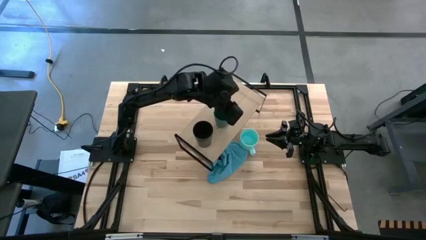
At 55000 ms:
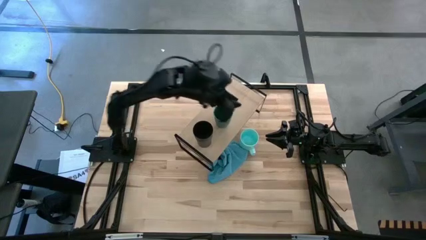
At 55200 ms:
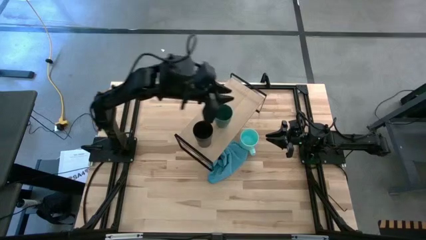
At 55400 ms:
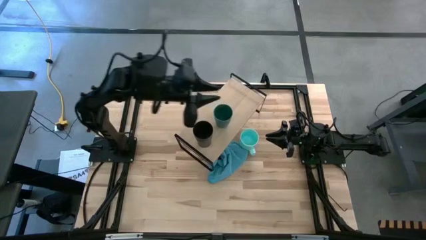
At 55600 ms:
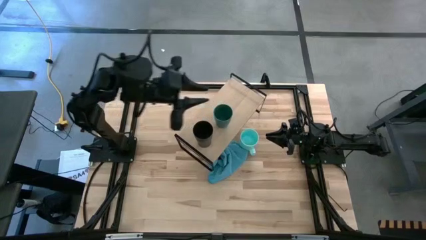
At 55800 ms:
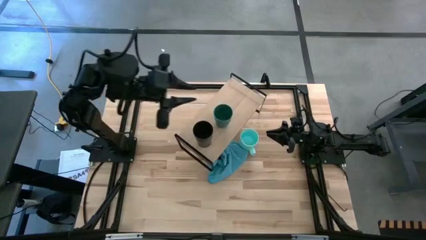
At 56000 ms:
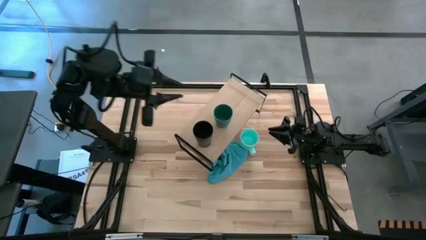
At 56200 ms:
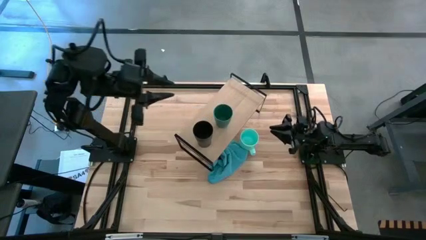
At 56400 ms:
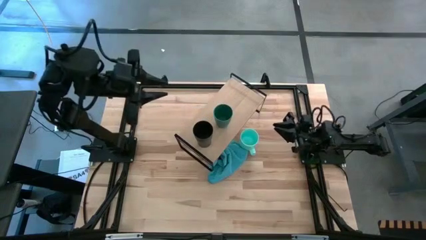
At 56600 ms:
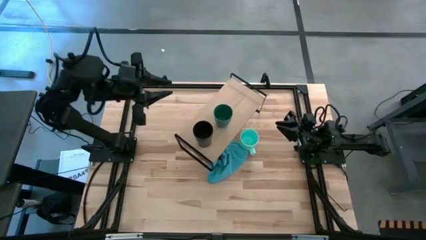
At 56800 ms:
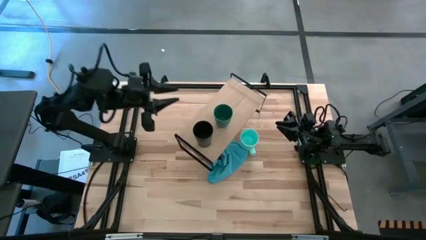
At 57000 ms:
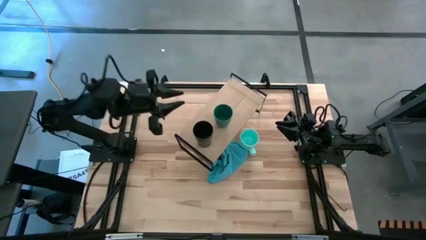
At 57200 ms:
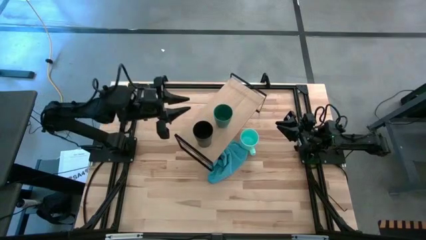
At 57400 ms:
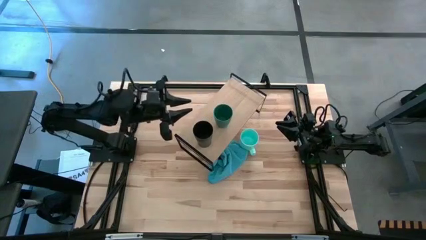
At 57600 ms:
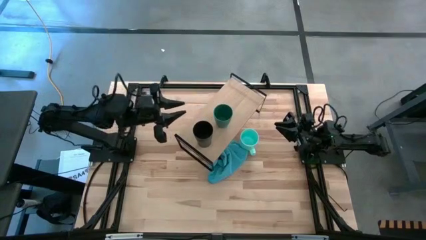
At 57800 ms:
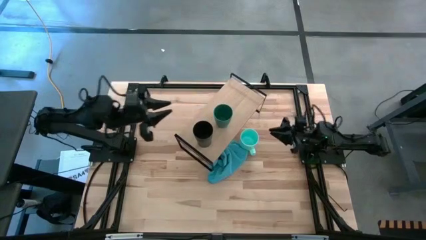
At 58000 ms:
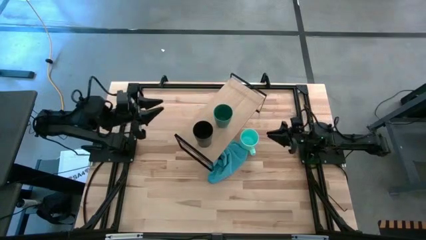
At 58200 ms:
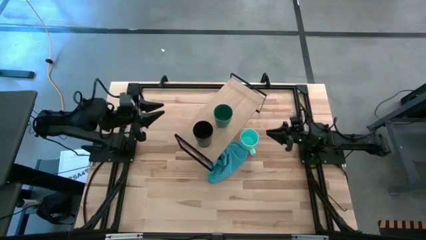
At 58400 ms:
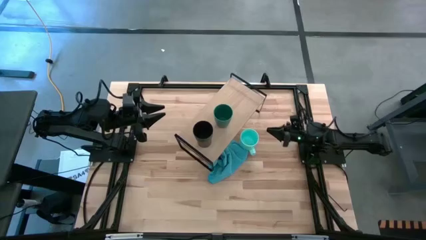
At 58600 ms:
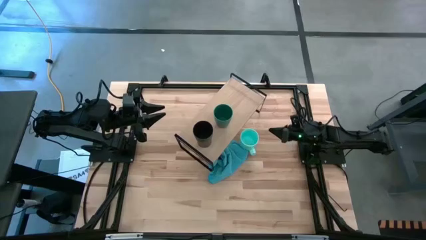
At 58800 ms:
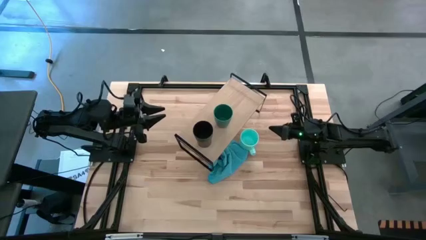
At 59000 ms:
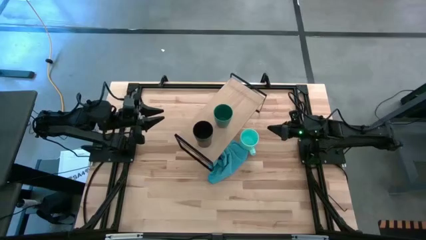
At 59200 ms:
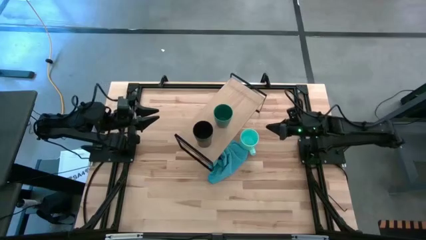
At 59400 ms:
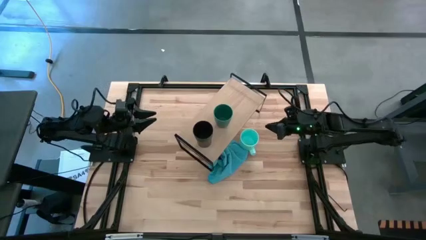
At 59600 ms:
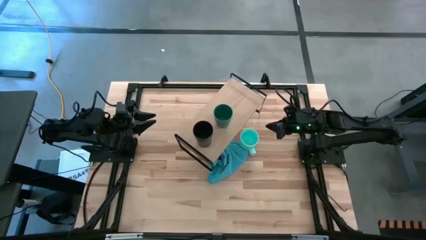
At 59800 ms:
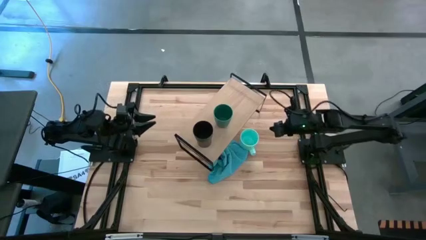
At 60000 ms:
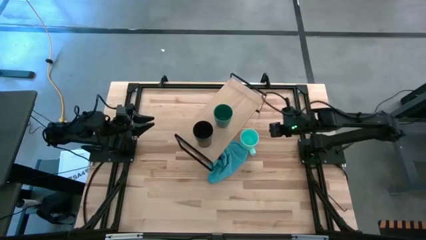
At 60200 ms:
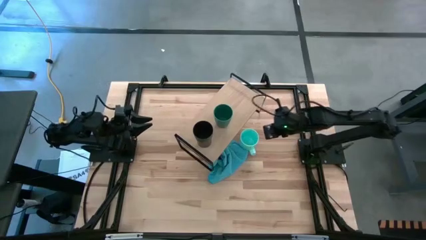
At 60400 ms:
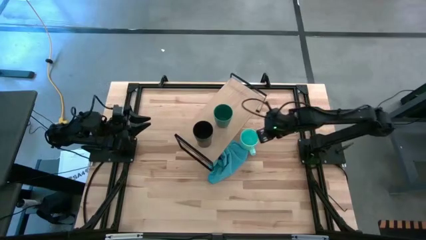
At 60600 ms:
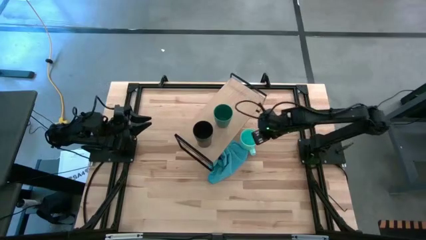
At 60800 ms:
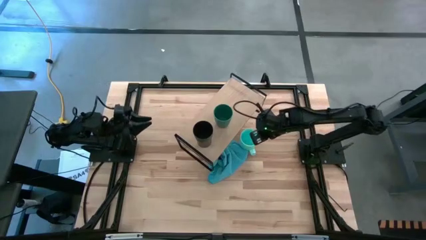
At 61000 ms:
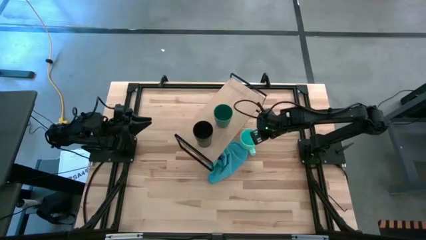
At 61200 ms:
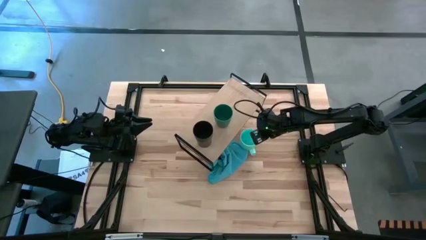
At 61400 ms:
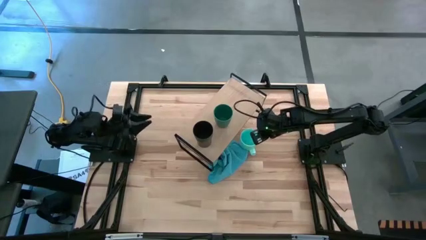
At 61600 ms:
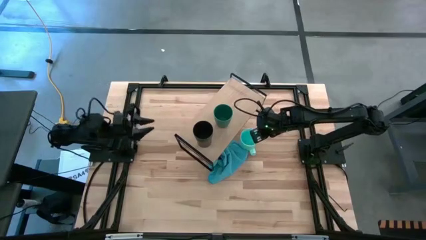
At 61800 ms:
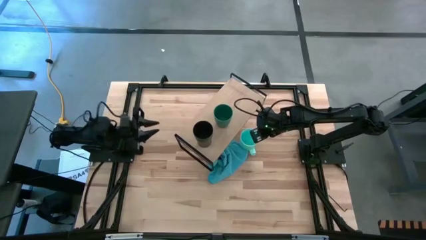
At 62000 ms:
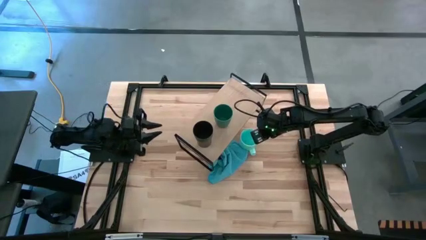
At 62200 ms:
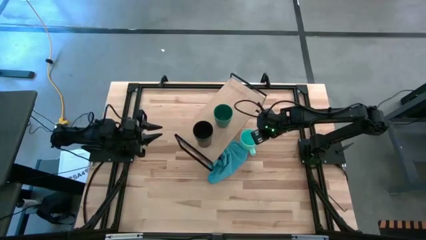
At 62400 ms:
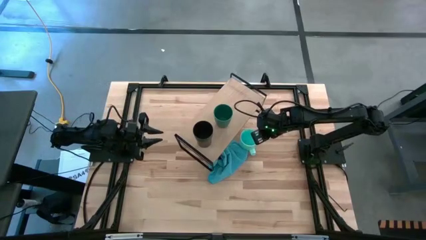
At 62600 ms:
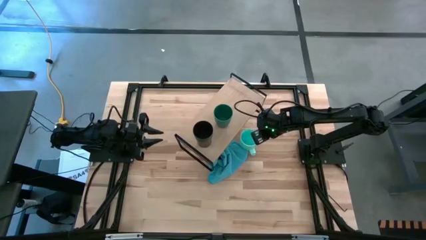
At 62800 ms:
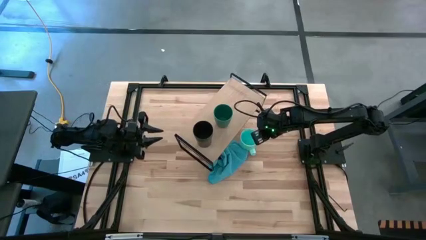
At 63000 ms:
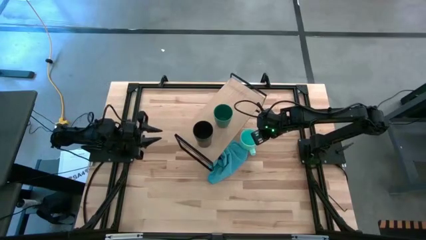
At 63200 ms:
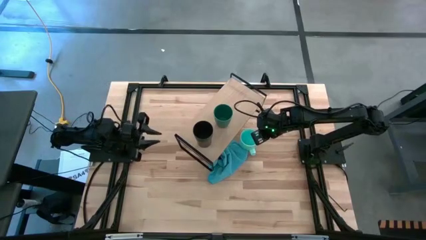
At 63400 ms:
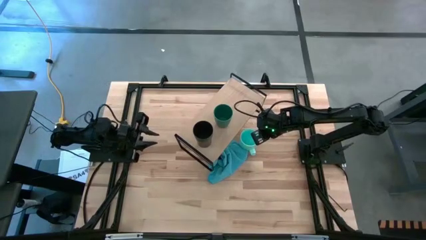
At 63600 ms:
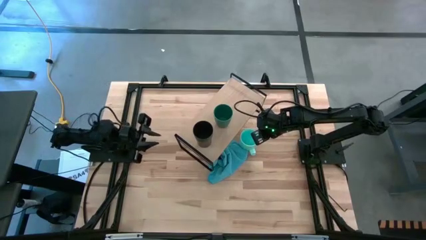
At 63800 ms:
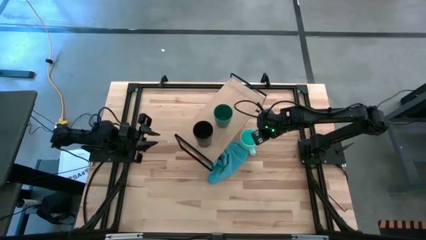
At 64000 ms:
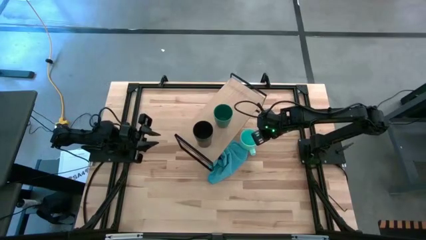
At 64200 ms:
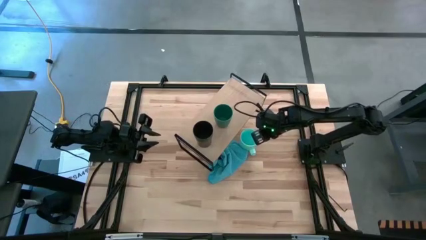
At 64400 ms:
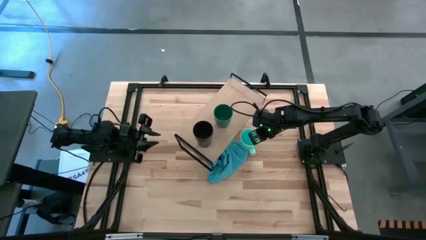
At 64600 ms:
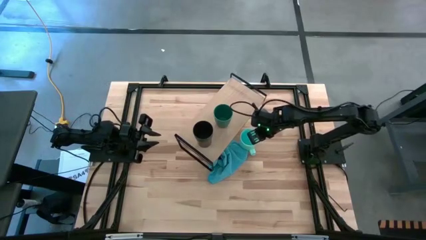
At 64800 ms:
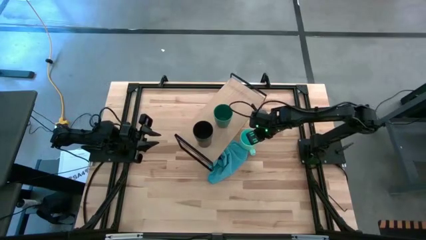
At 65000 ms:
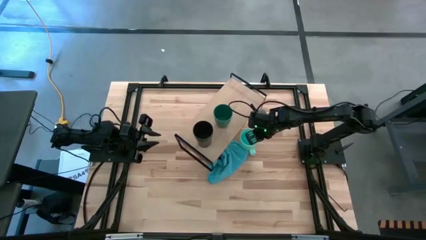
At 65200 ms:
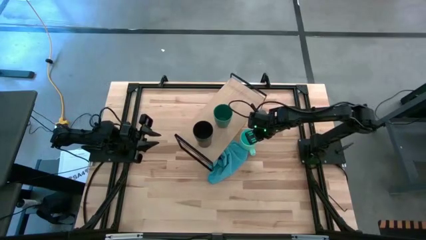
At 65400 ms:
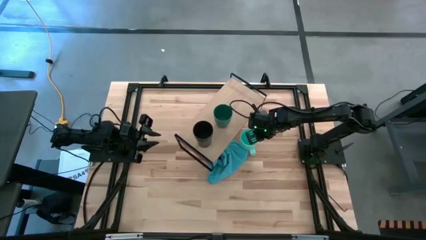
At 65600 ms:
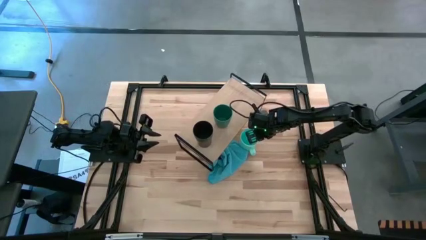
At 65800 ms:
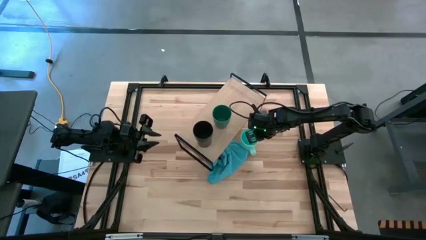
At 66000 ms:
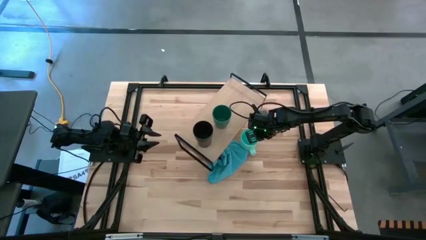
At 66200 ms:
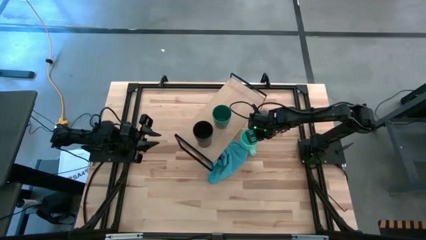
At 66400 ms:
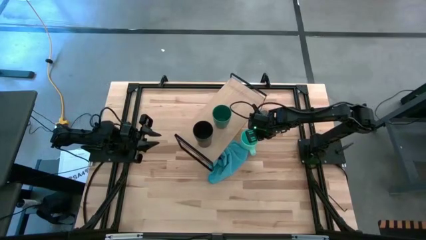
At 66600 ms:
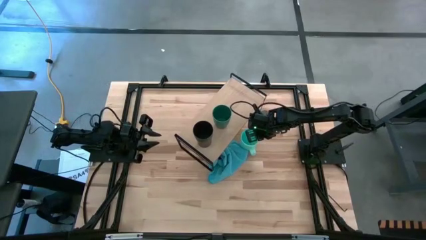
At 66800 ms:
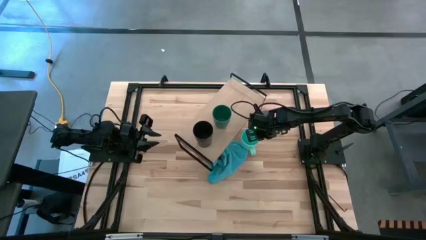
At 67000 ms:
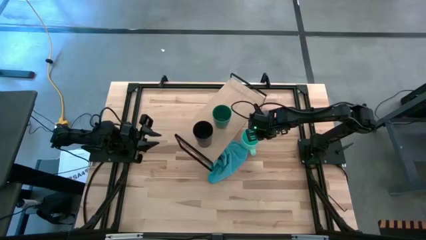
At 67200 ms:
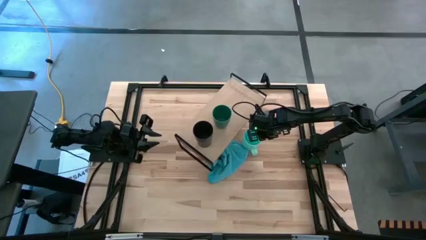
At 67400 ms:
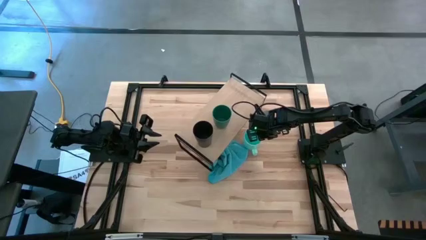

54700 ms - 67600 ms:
Task: Stack small to large cups/mugs on shelf
Put the light blue mug on the shelf

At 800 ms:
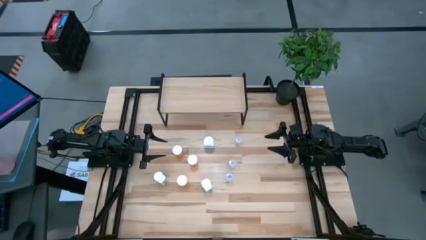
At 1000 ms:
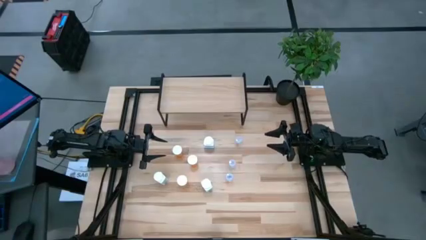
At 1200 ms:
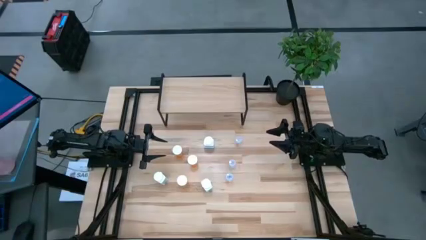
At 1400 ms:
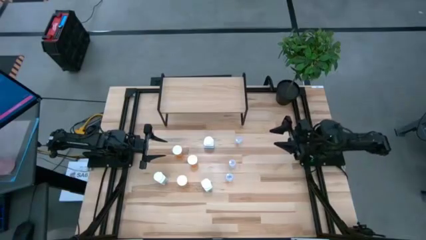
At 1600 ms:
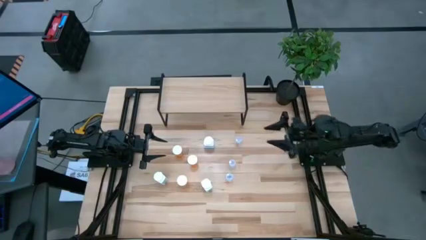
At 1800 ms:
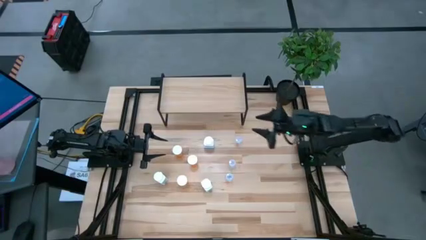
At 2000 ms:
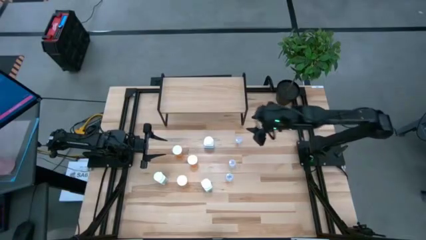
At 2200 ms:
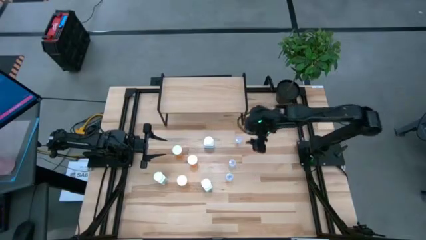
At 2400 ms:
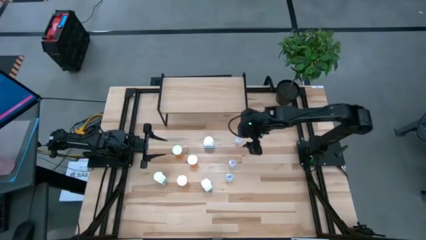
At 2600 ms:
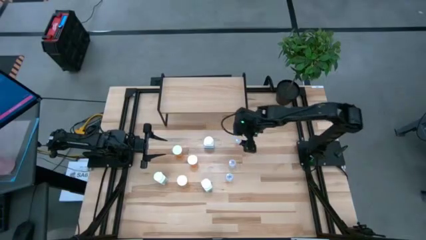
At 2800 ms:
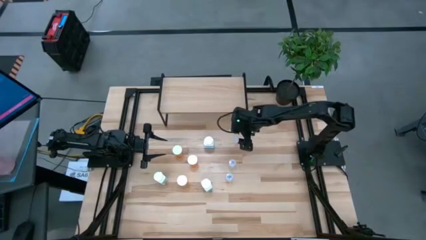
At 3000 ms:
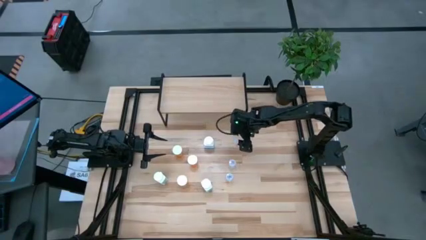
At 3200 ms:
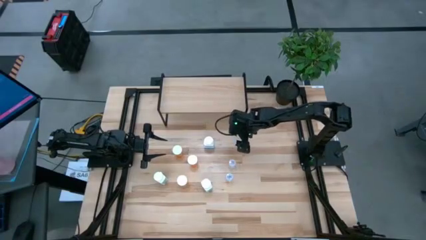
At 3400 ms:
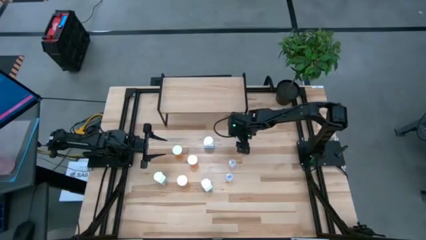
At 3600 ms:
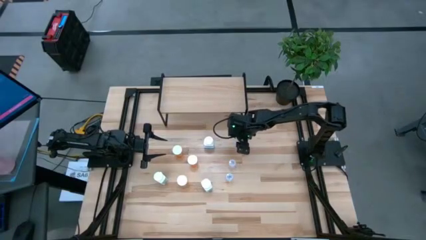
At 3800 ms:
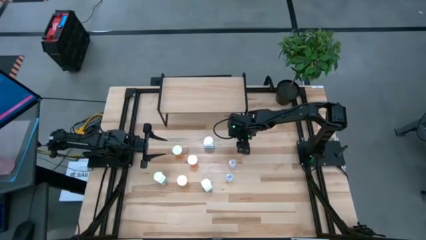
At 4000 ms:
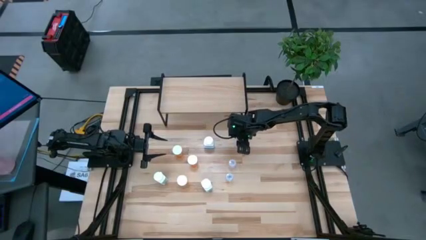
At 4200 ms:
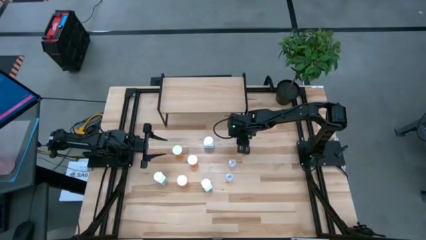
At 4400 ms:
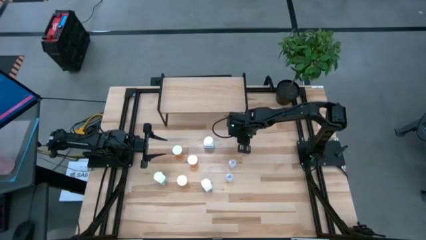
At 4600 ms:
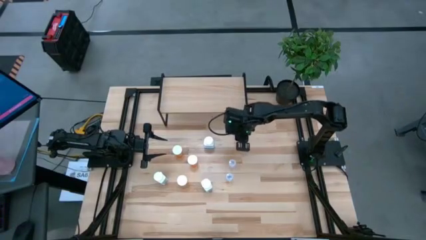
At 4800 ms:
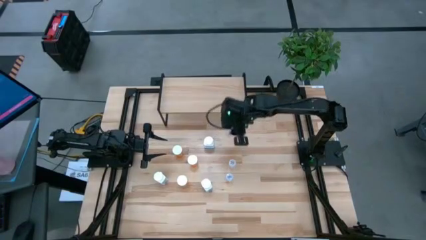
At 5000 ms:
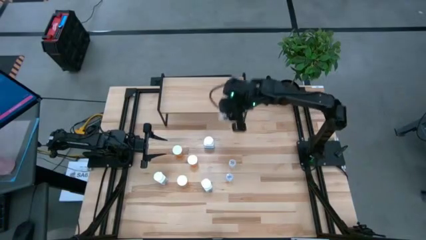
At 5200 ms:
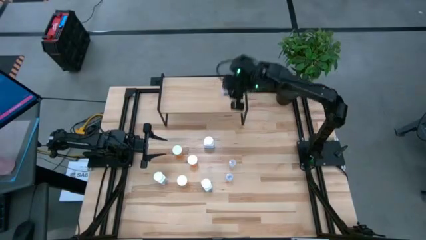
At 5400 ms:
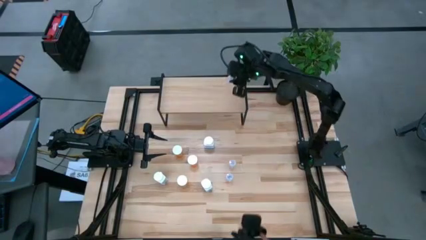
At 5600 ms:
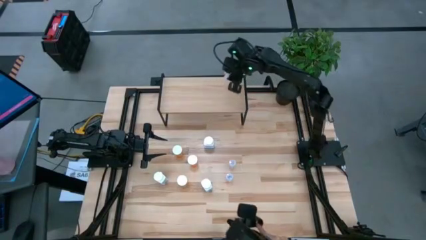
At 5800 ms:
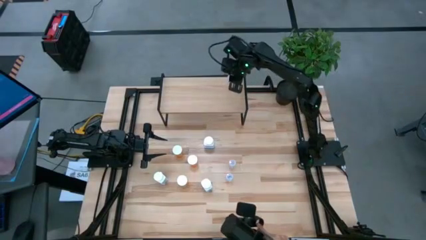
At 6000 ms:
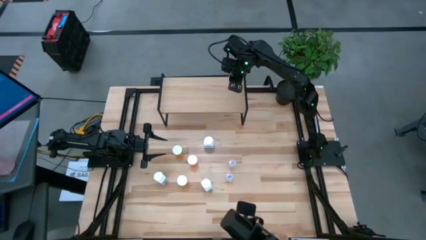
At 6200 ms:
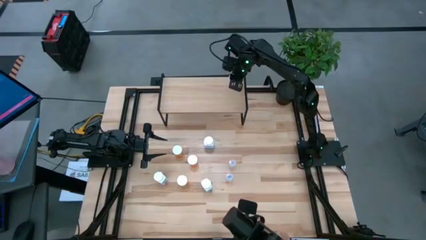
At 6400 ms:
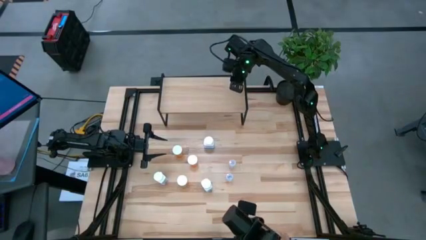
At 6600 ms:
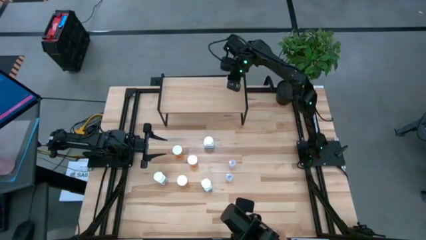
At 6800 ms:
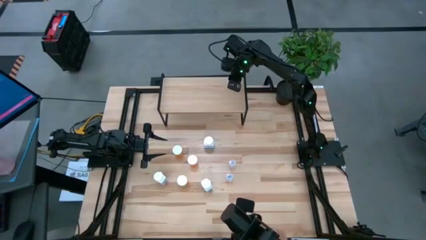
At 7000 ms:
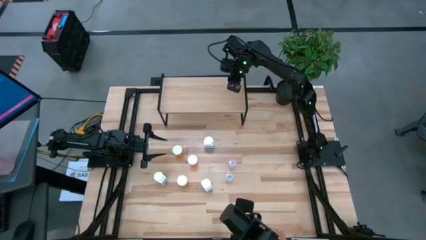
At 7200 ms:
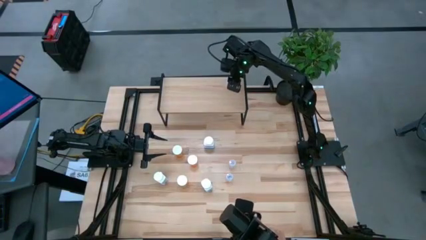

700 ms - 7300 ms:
Task: Pick and place medicine bottles onto shelf by color
Put the top transparent pill bottle on the shelf
